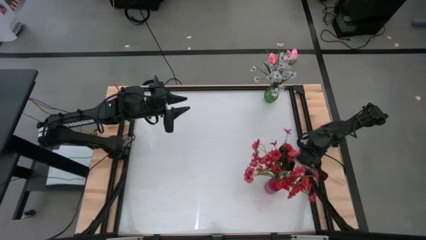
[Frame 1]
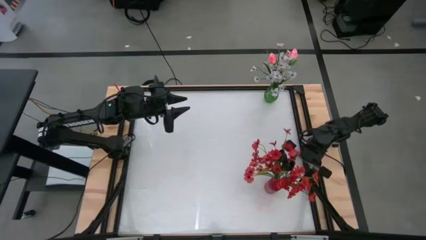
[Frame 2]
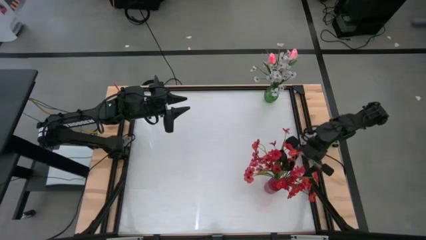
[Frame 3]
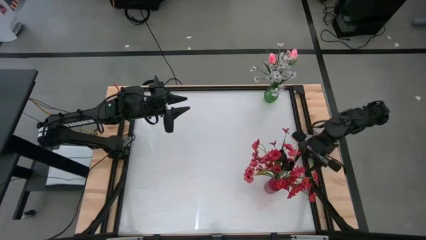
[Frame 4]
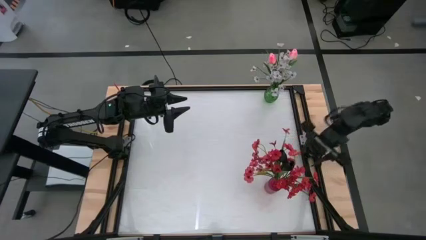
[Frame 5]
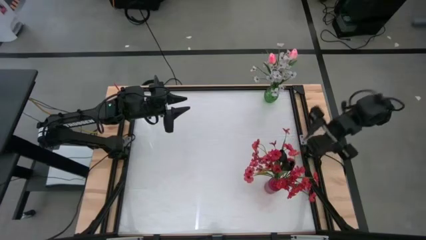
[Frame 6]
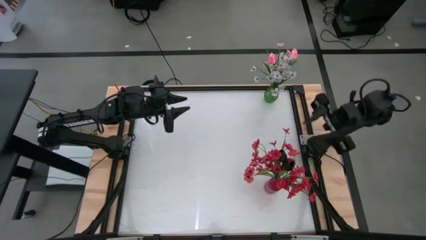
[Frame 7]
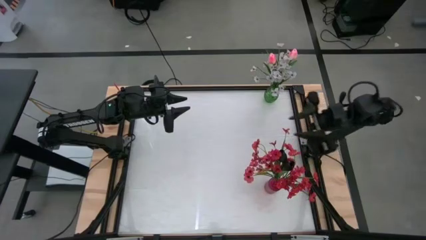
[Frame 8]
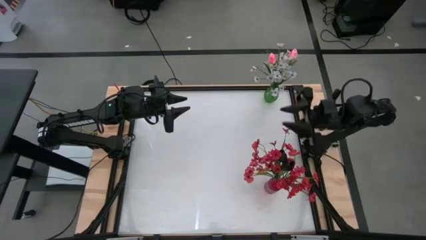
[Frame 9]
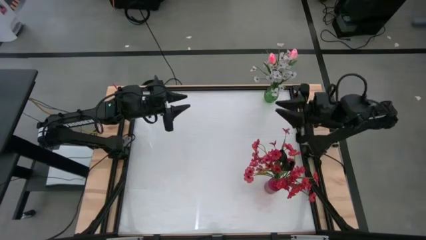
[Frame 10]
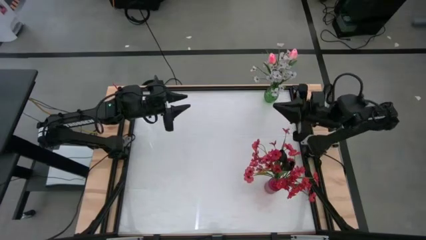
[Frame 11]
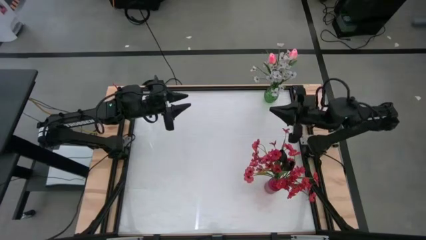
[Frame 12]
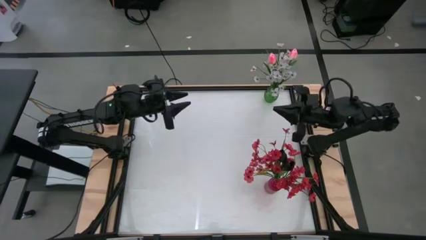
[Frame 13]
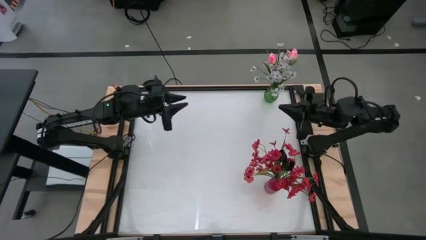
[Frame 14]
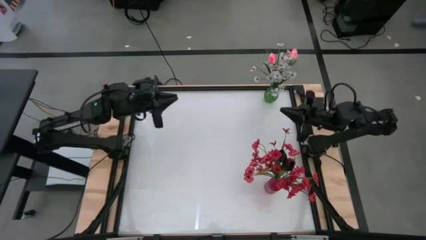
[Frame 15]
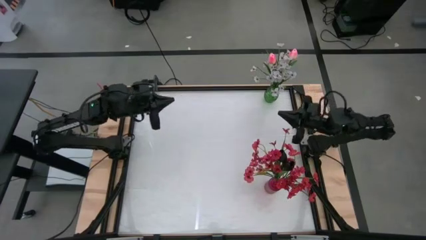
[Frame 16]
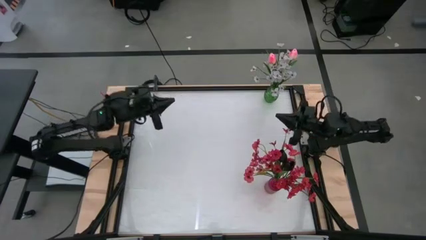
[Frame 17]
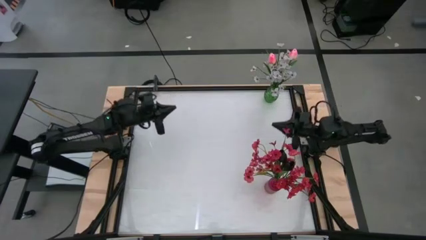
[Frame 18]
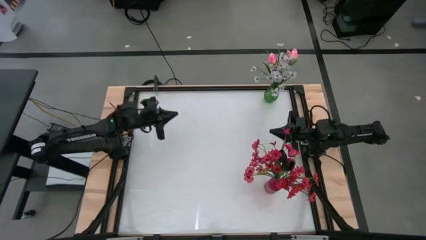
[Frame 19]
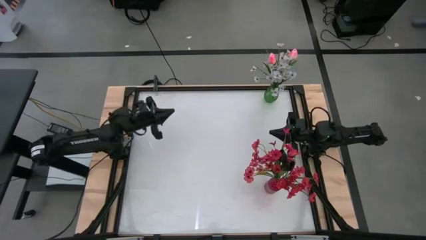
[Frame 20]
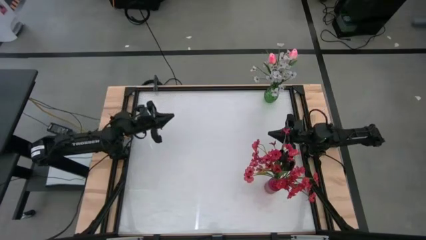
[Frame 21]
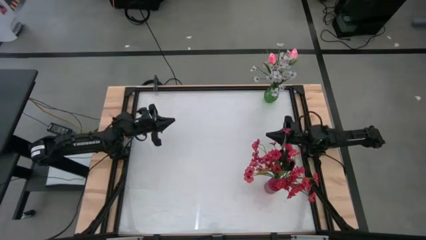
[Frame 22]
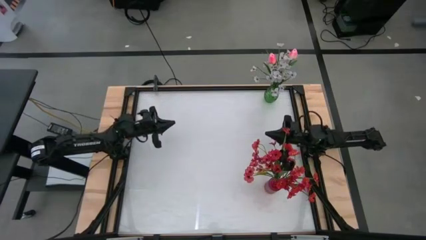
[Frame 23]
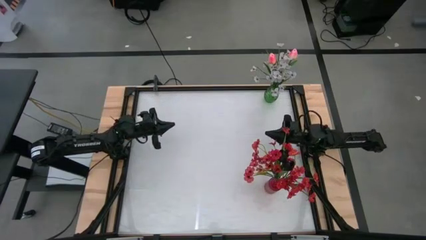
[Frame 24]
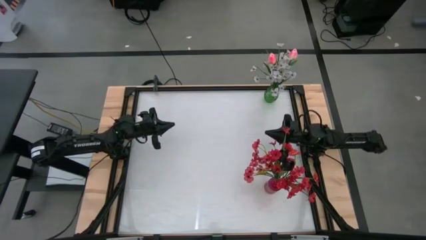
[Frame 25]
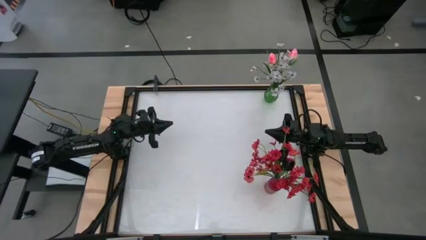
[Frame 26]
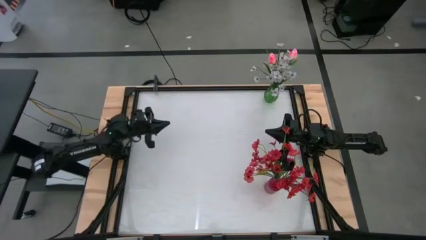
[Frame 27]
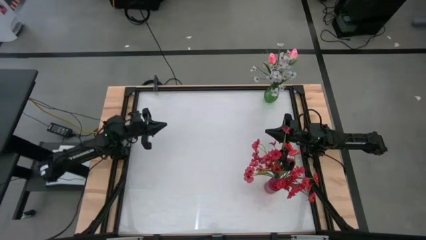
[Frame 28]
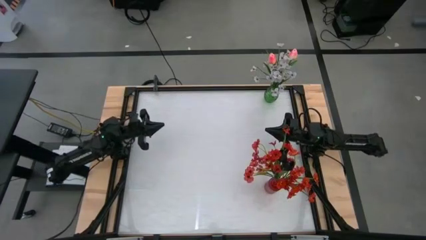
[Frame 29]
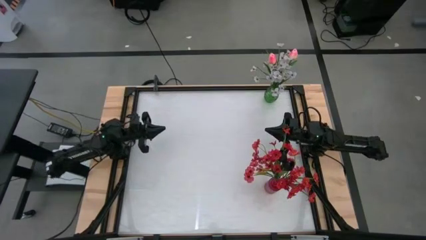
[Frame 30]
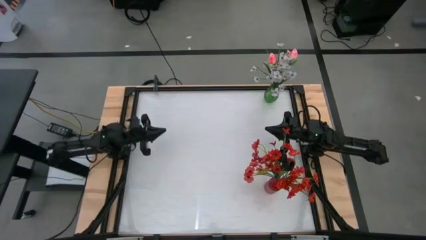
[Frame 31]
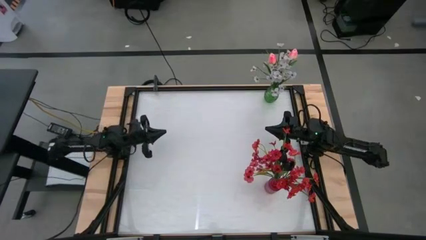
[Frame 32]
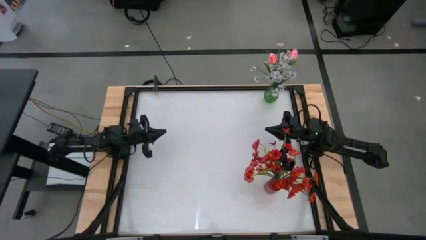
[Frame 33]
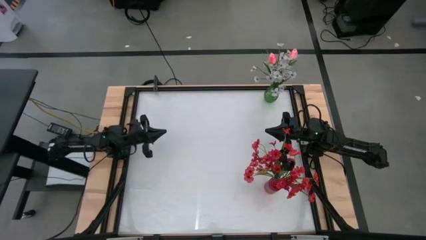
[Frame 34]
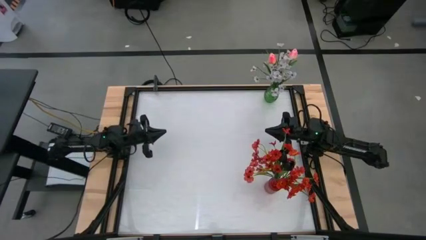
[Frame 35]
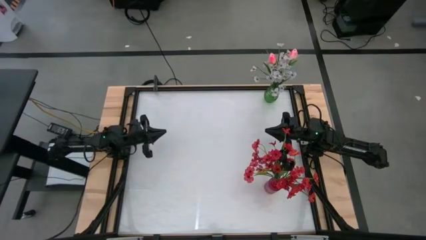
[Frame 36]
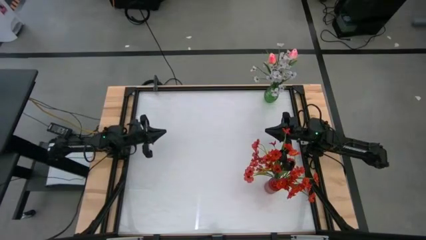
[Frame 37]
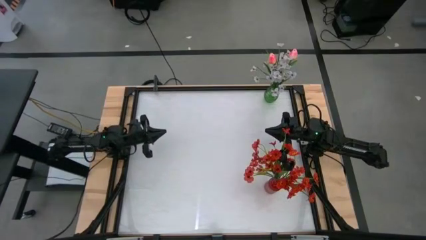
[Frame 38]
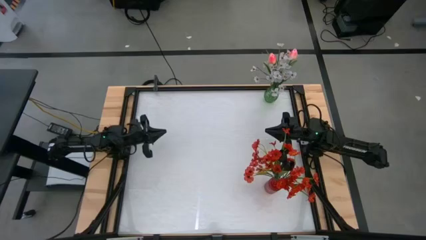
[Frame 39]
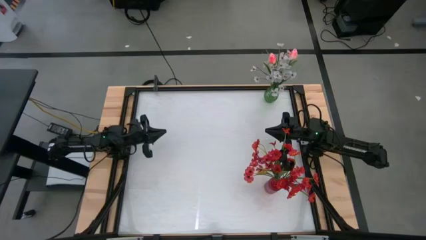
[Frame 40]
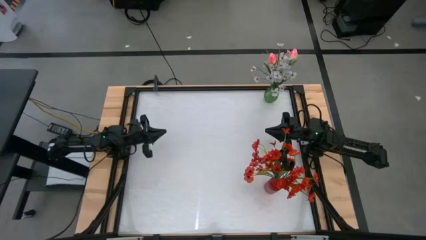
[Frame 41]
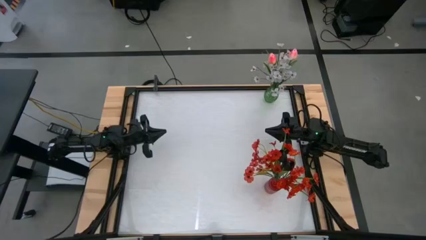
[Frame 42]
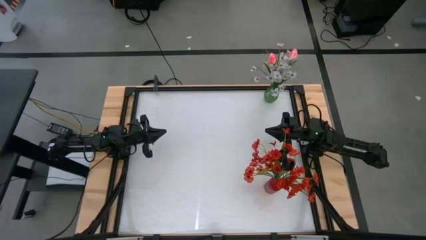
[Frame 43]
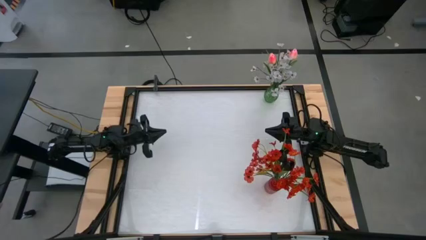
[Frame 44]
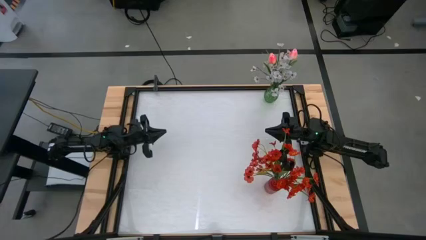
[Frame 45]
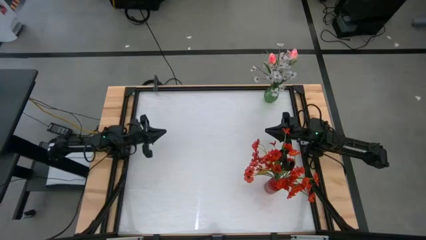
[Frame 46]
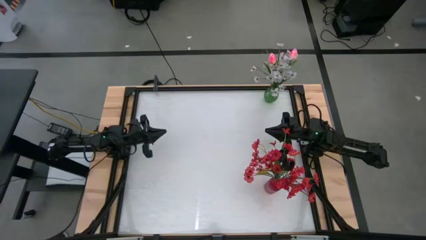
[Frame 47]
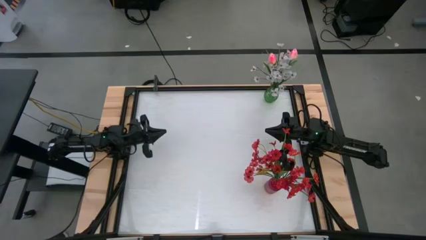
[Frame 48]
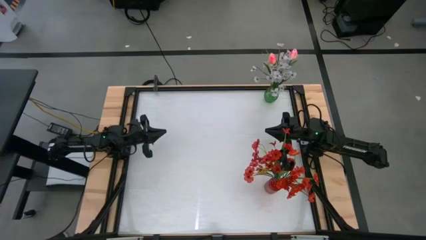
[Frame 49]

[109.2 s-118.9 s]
Task: Sort flowers into vase by color
Return to Home Position
